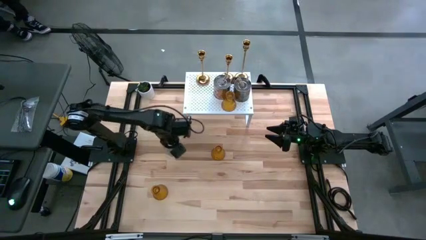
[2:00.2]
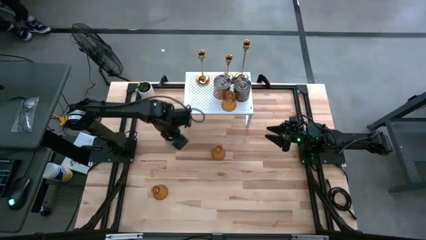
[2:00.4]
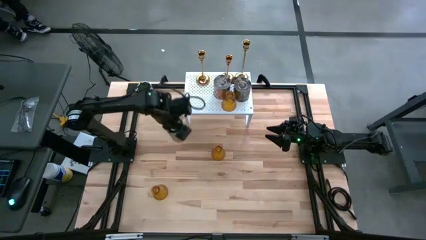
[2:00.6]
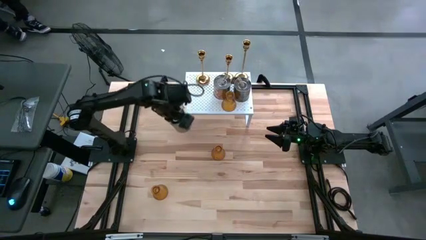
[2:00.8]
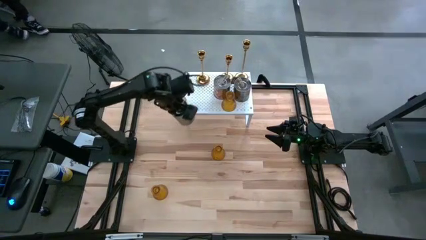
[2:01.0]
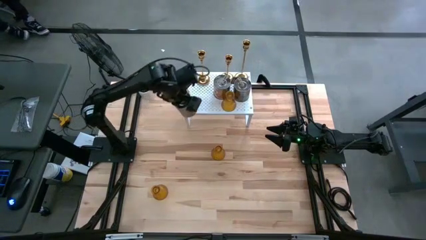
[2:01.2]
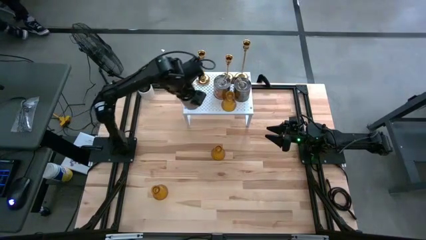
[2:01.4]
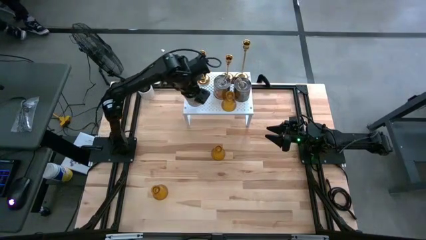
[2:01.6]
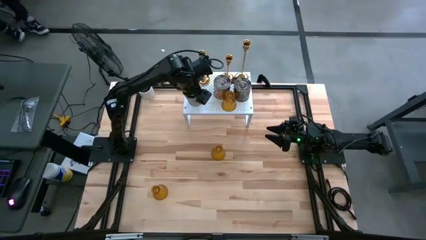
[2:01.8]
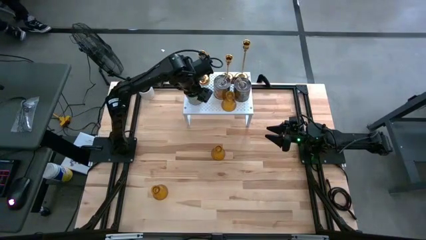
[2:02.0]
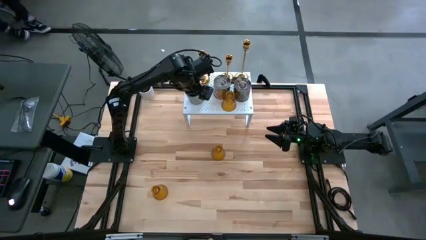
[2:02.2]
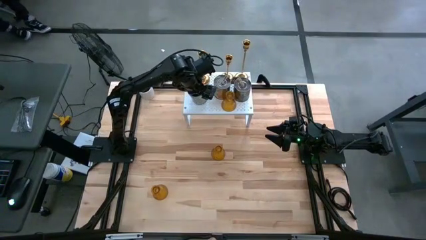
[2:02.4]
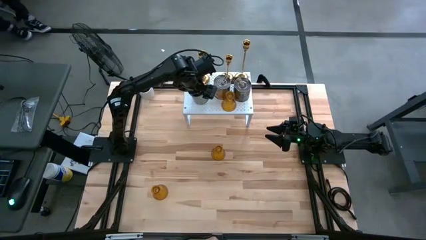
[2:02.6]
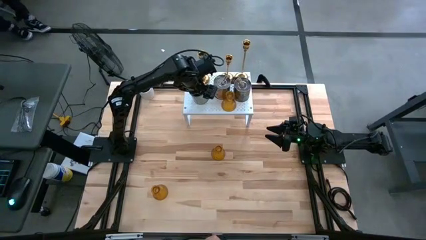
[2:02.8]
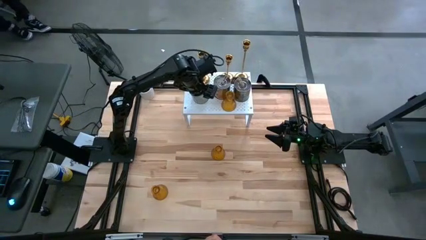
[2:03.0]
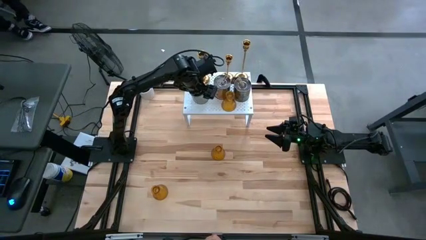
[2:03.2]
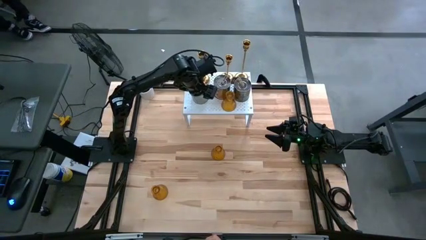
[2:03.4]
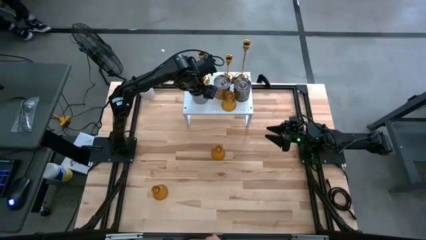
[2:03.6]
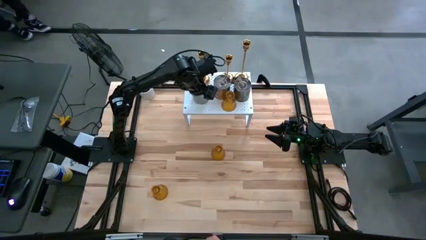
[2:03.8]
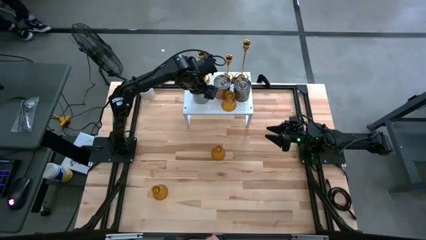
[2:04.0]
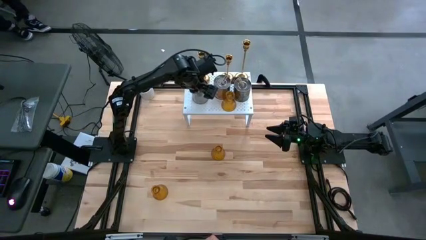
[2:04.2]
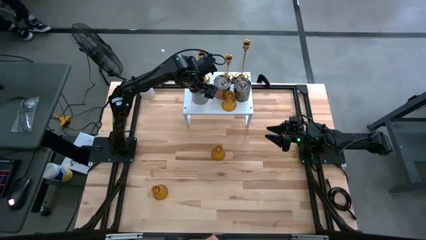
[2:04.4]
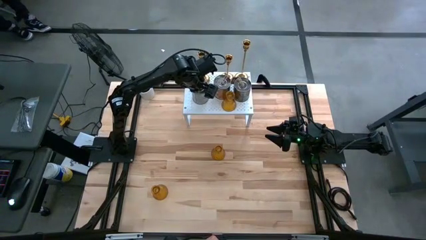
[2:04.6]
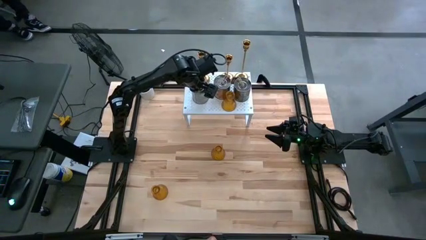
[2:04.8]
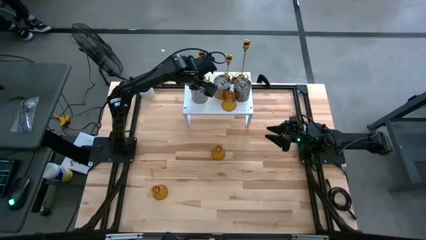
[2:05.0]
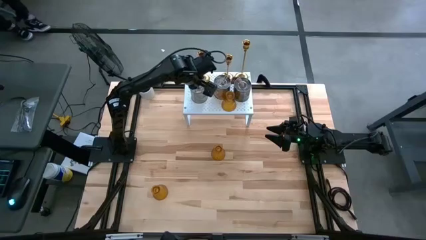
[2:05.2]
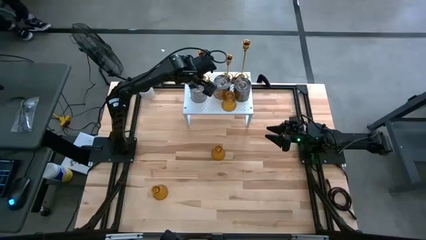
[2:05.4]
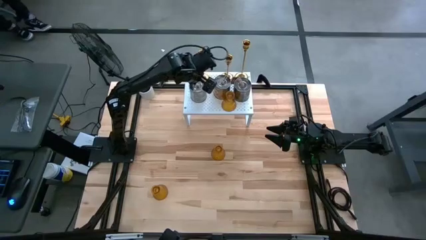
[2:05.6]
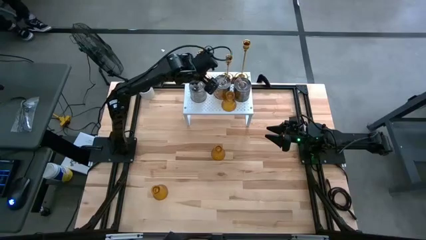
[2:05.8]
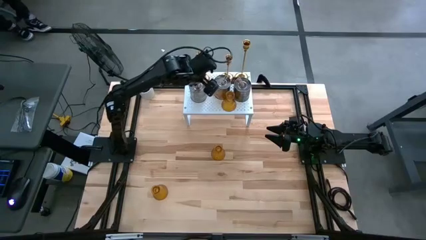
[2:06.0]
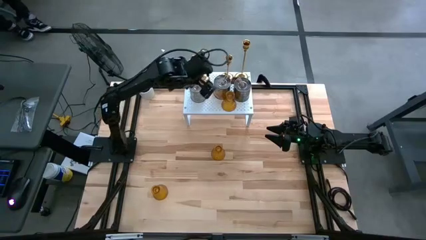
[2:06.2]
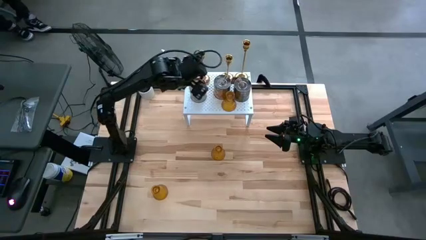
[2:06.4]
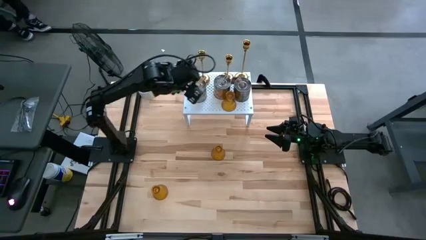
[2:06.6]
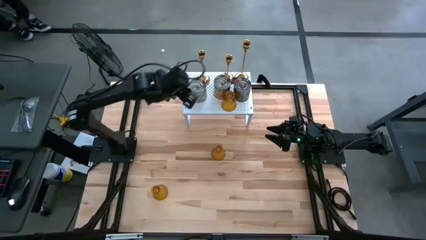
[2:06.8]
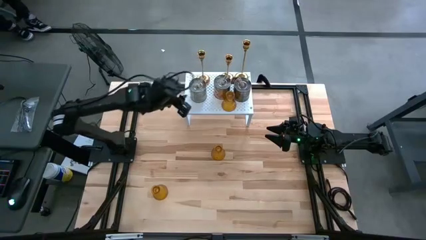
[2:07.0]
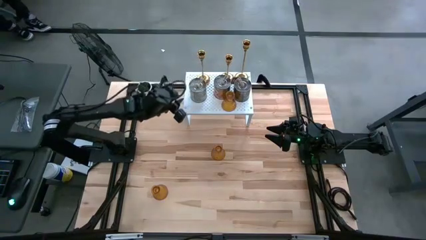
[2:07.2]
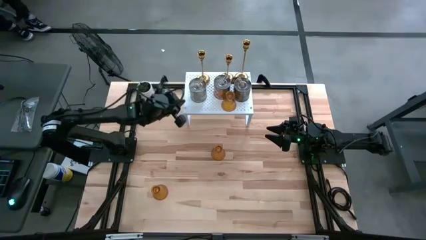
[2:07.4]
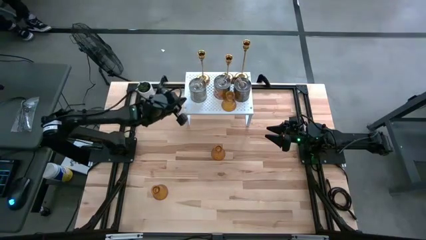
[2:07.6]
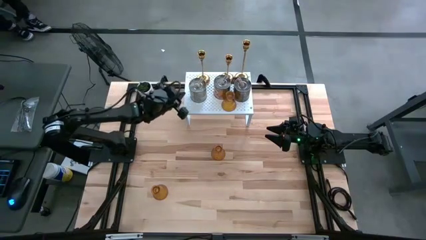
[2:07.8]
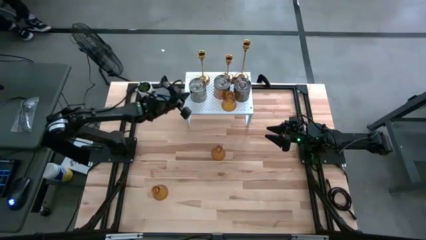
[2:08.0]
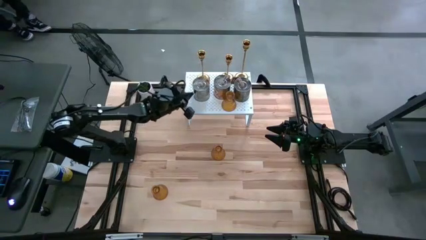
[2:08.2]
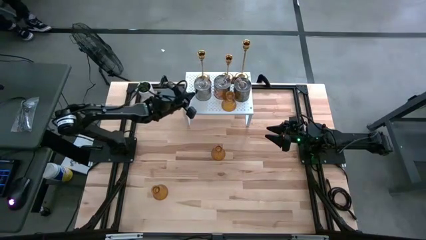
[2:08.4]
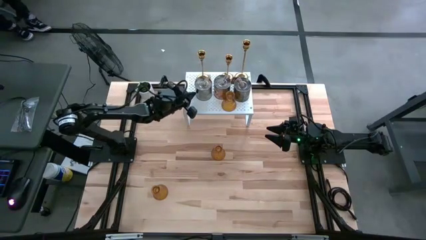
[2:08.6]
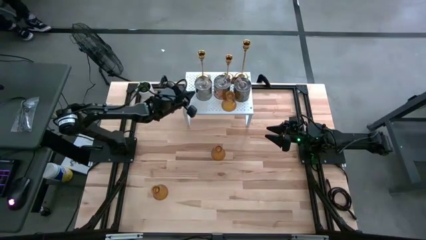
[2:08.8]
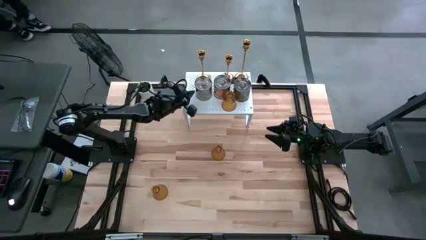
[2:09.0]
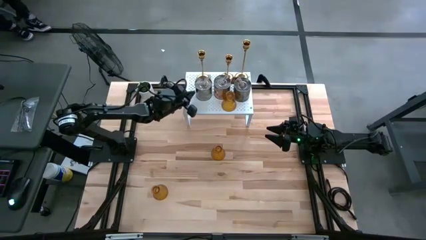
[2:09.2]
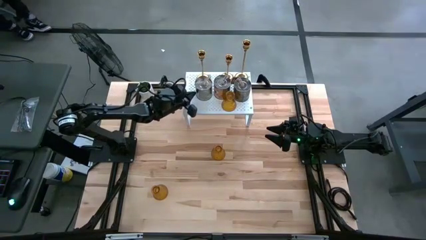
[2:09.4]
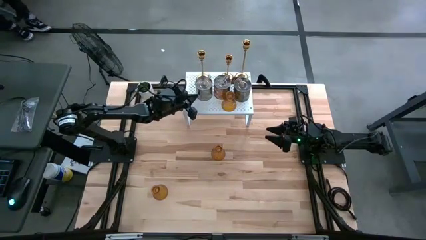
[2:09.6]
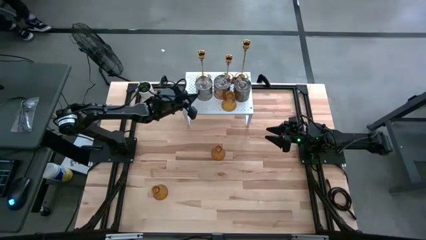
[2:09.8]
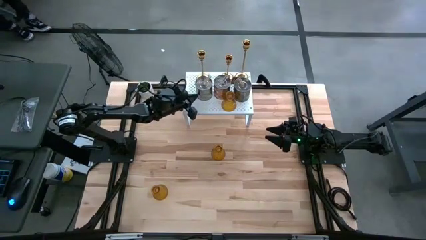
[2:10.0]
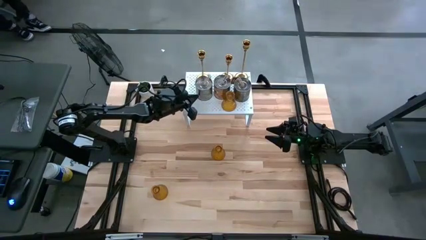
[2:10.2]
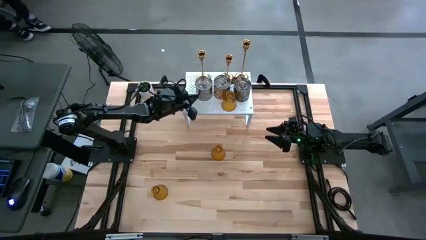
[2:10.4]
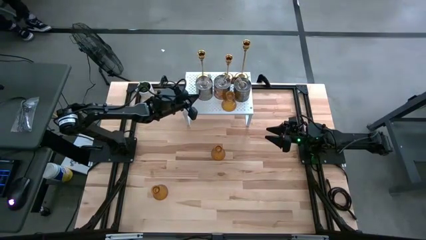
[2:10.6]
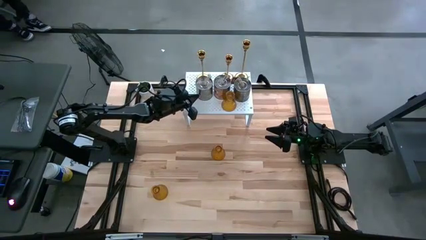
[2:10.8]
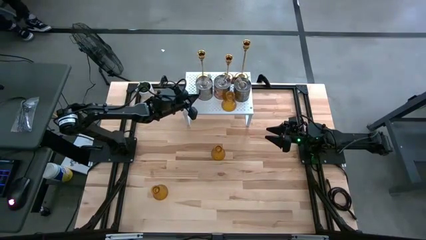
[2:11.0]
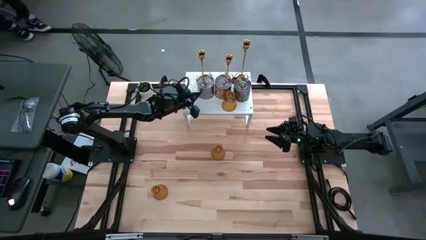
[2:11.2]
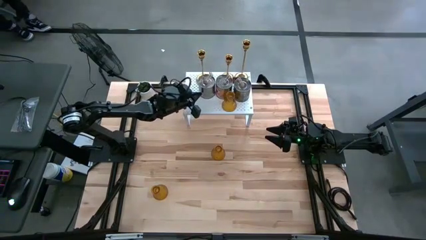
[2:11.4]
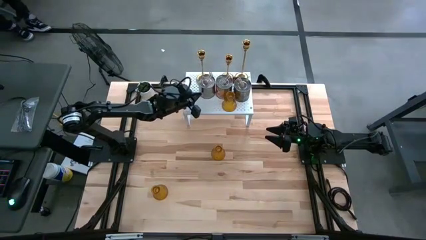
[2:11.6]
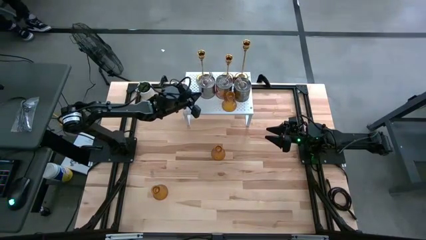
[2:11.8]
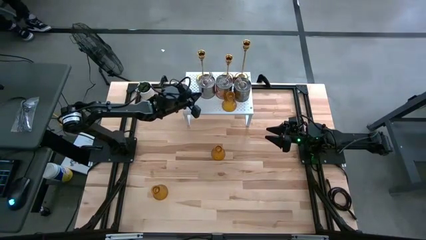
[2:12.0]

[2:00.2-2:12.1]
Task: Pick & Place candle stick holders
Put the green and silver scented candle on the shelf

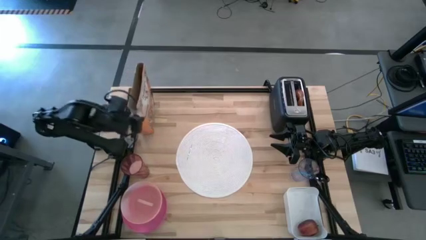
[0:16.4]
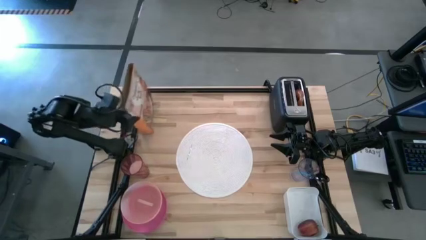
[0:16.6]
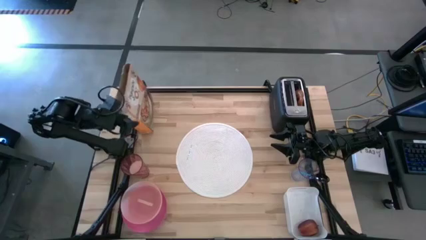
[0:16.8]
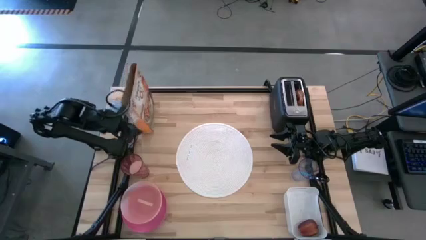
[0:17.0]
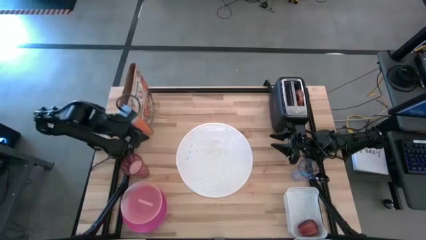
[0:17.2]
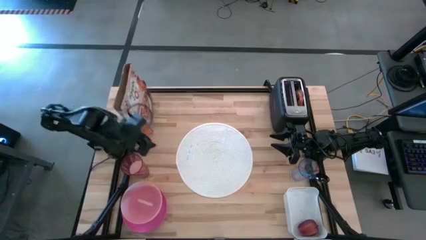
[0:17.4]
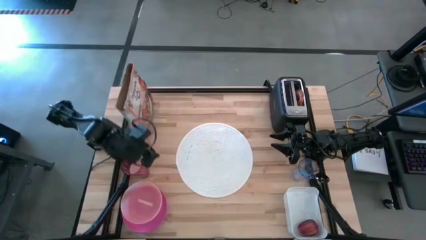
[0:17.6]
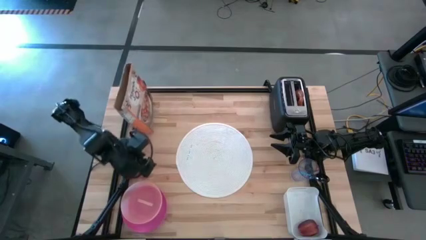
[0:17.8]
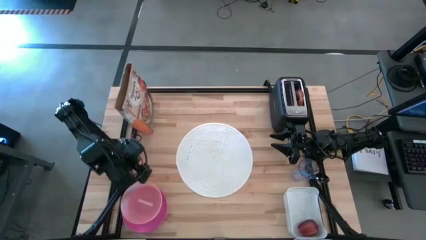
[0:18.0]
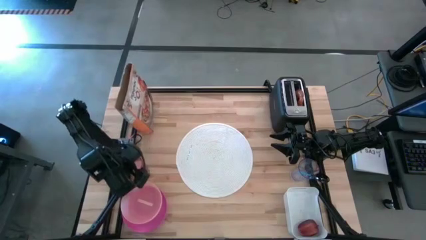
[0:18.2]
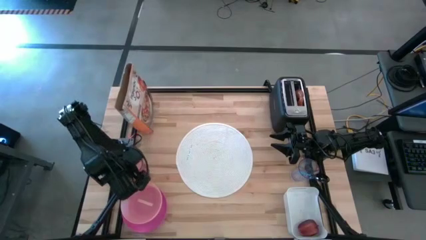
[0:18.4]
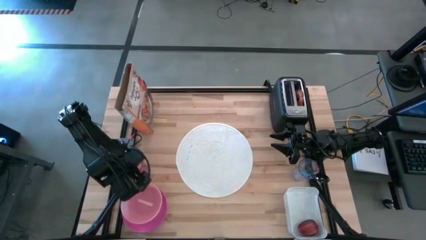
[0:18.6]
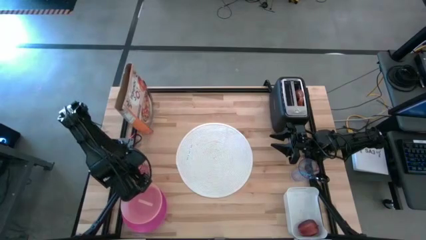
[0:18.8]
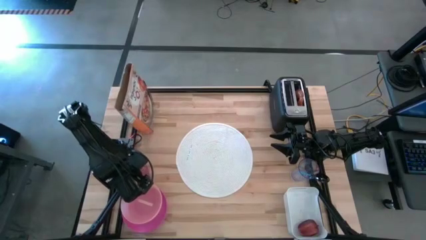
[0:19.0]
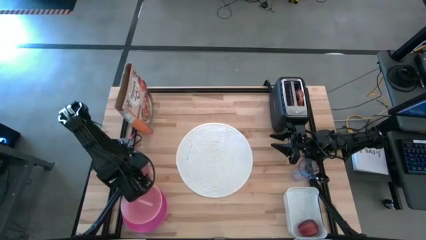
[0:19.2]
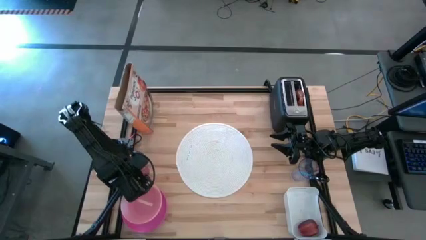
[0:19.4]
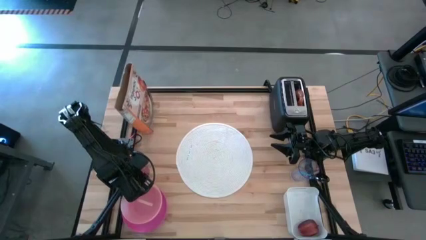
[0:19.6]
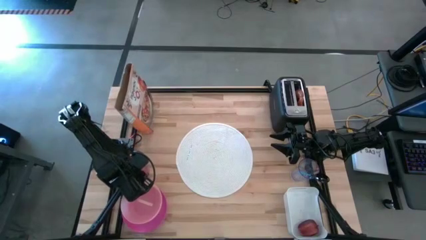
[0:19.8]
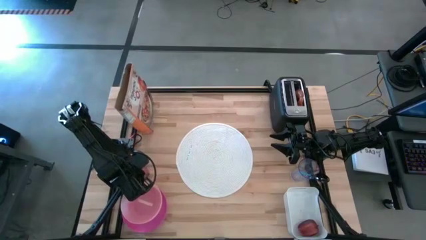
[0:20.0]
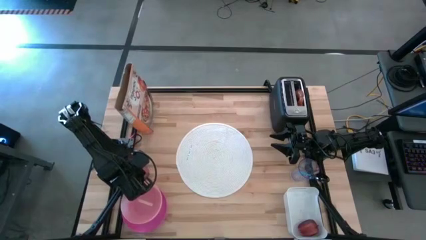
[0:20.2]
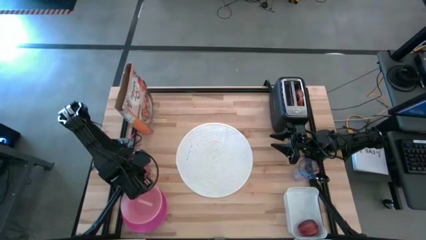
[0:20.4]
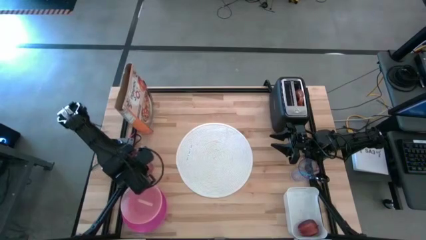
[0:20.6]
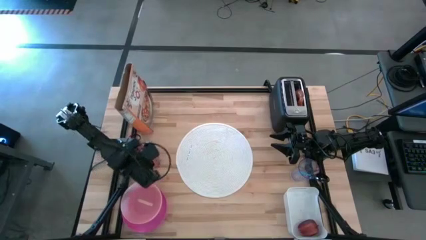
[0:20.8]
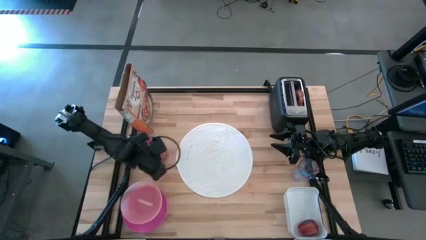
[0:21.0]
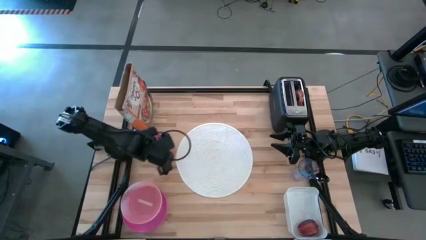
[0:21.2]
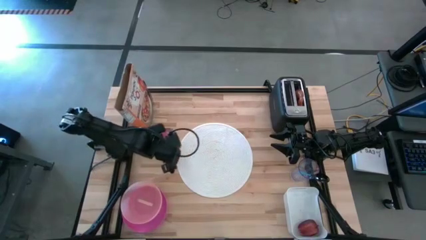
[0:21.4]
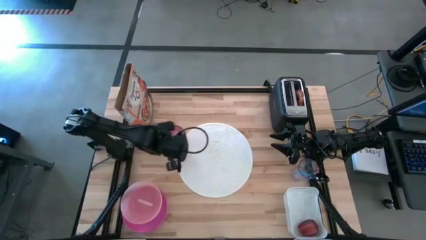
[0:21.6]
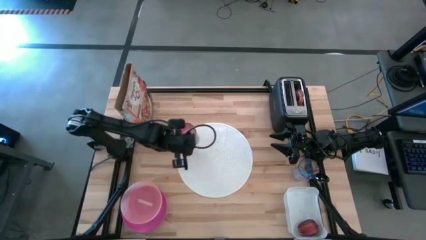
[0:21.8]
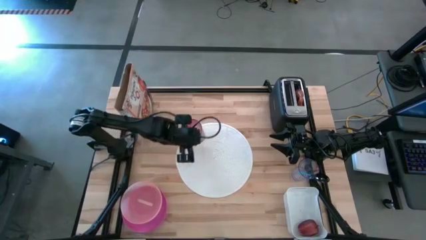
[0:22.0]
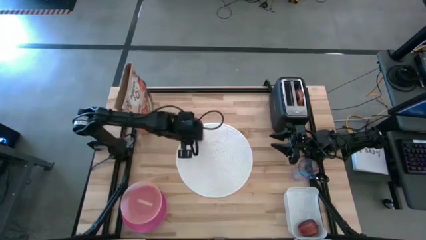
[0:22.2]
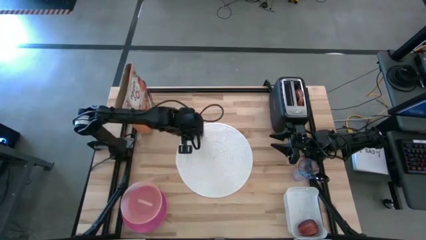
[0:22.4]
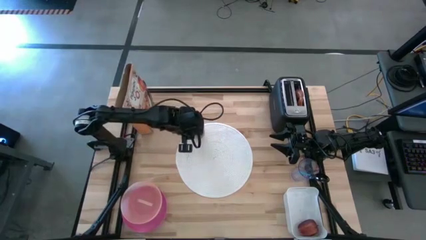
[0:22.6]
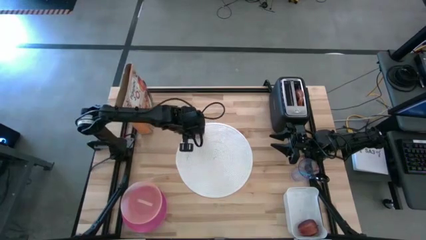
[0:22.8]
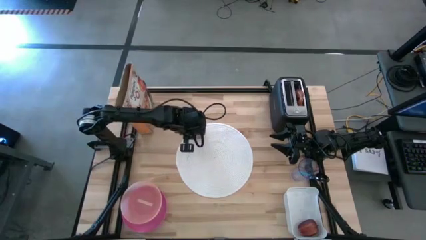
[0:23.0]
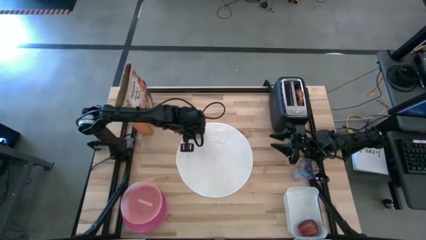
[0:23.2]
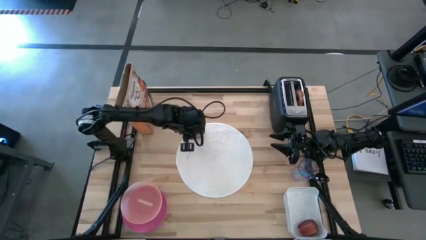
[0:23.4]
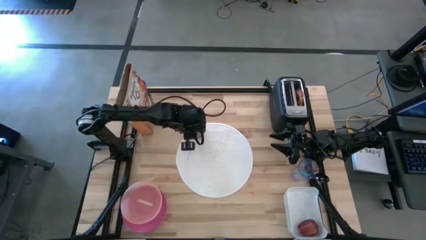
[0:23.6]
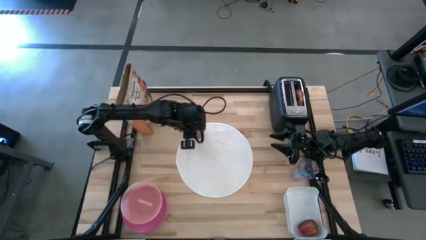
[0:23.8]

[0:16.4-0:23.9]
Task: Arrange a breakfast setting
Put the pink glass on the top left of the white mat
